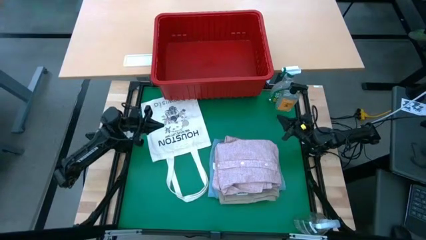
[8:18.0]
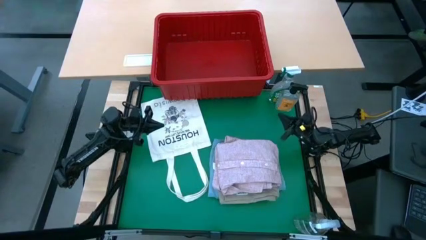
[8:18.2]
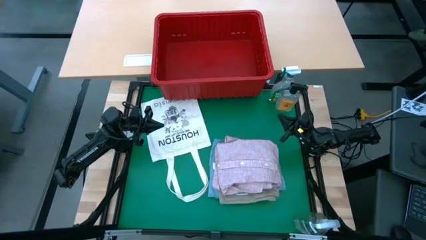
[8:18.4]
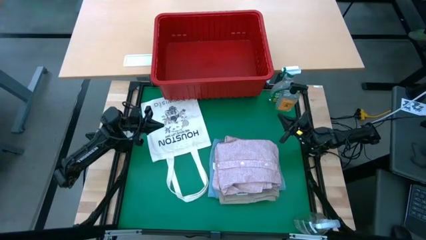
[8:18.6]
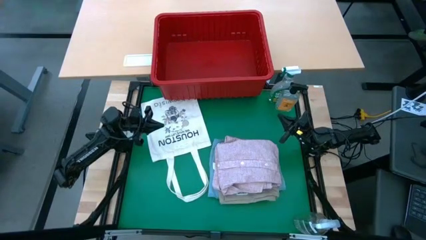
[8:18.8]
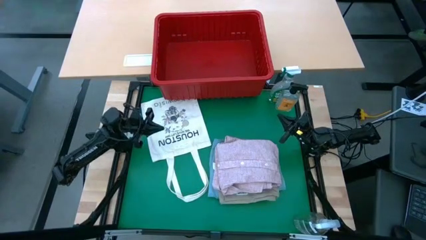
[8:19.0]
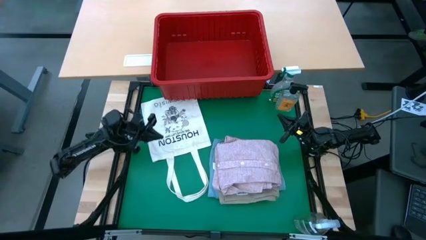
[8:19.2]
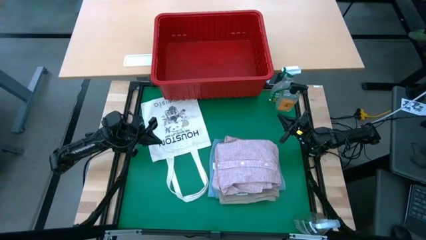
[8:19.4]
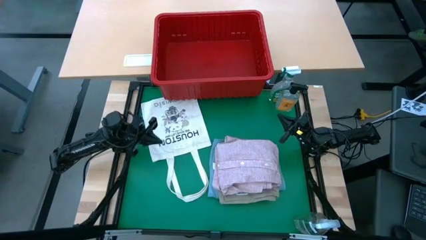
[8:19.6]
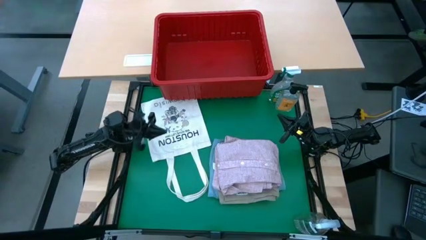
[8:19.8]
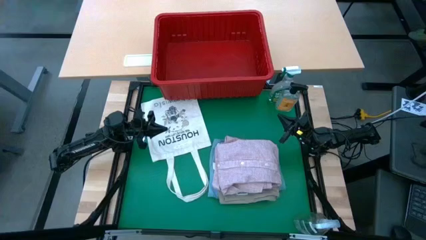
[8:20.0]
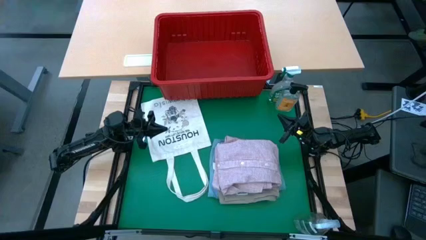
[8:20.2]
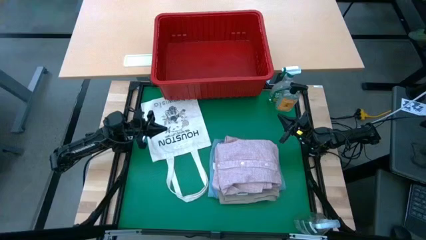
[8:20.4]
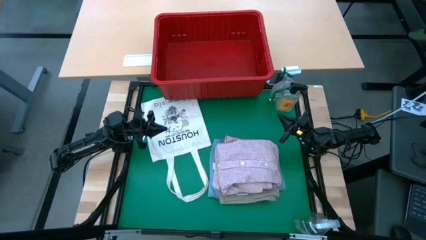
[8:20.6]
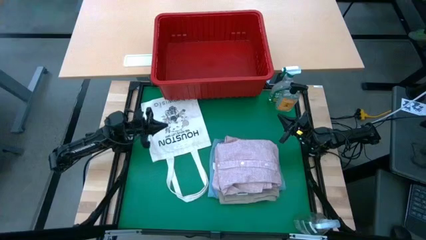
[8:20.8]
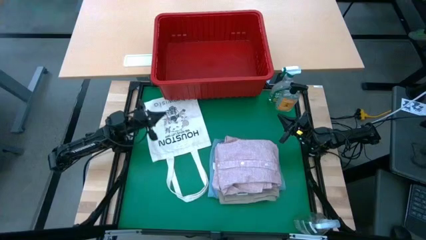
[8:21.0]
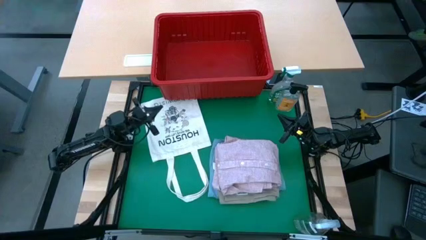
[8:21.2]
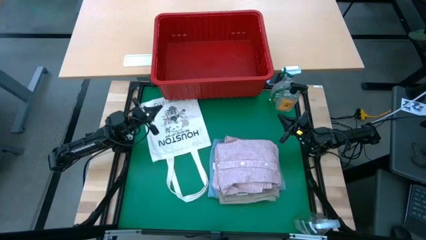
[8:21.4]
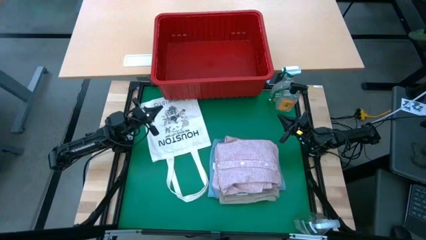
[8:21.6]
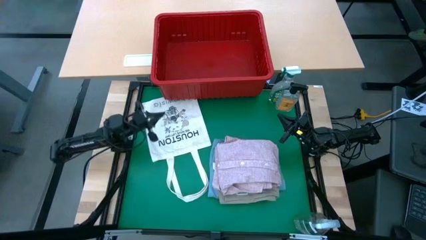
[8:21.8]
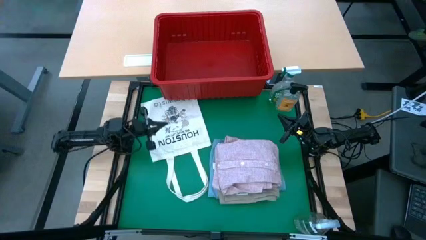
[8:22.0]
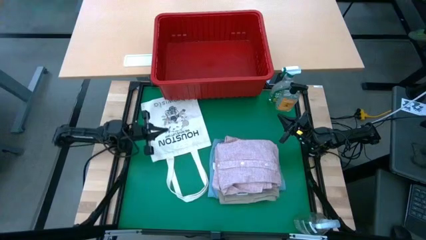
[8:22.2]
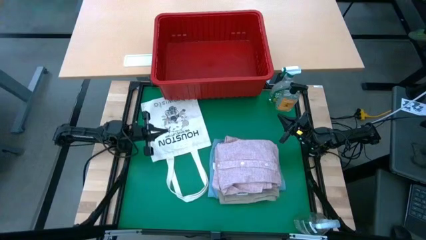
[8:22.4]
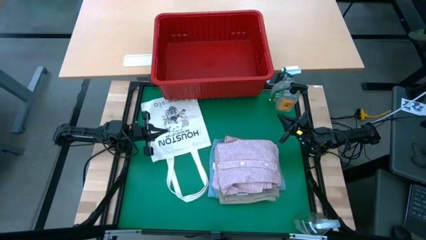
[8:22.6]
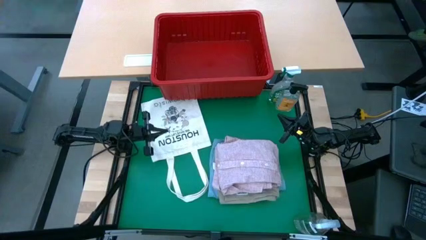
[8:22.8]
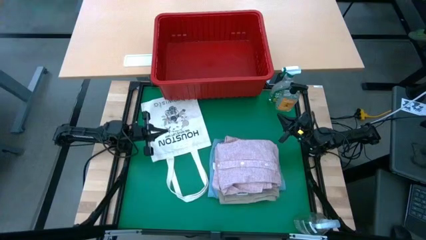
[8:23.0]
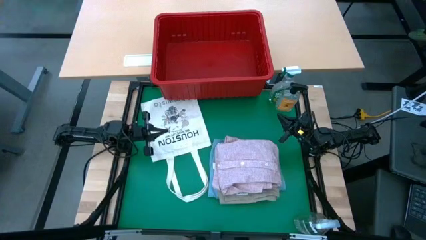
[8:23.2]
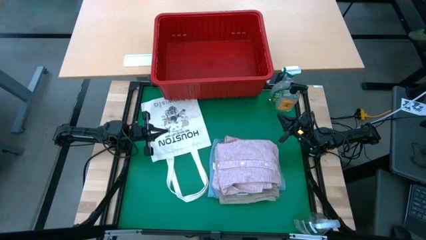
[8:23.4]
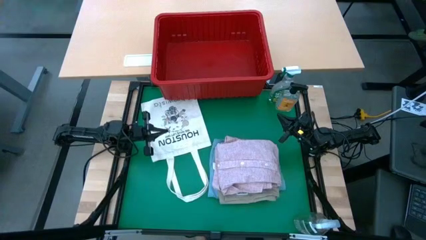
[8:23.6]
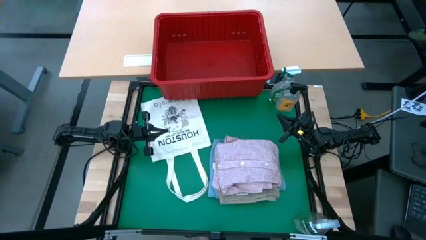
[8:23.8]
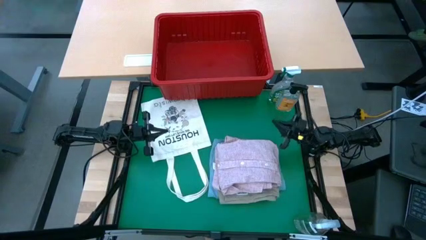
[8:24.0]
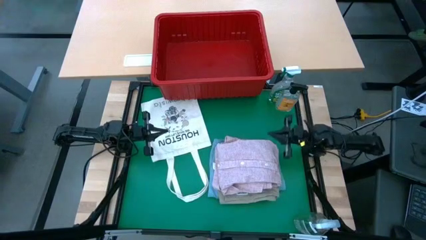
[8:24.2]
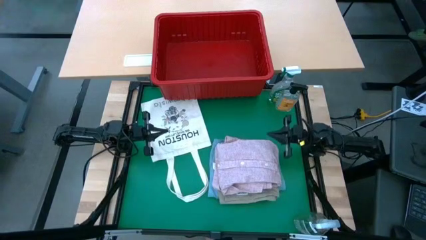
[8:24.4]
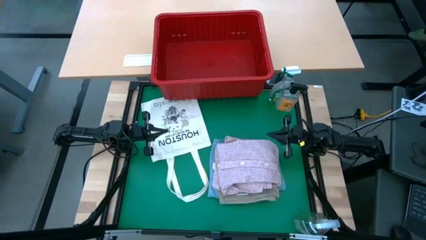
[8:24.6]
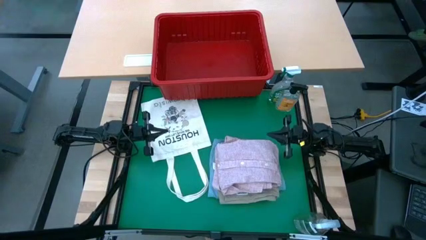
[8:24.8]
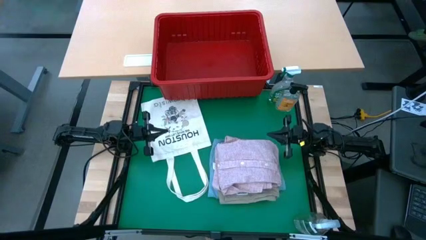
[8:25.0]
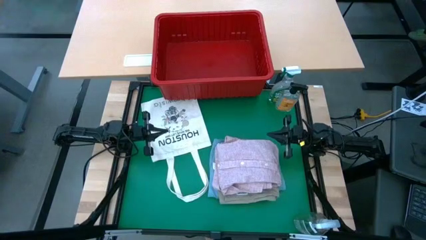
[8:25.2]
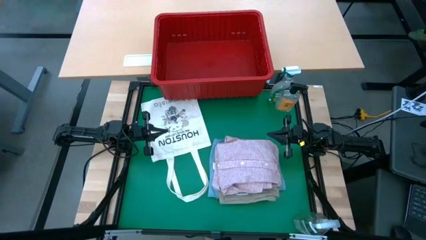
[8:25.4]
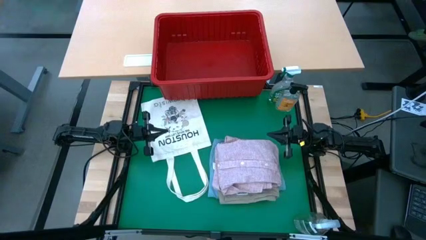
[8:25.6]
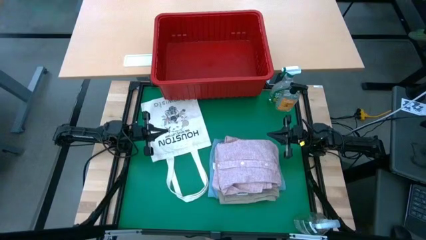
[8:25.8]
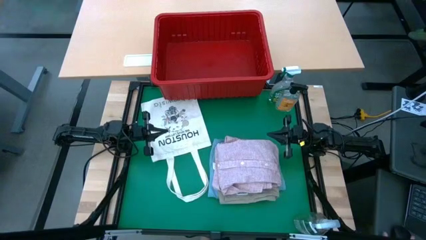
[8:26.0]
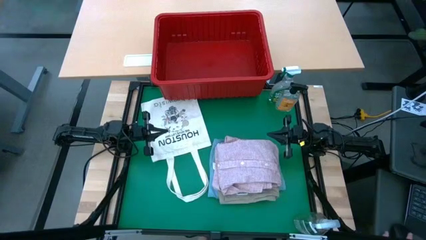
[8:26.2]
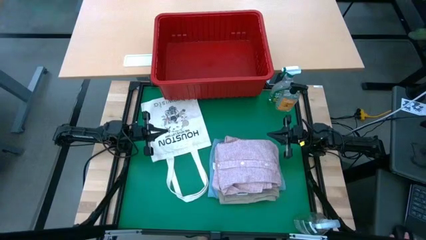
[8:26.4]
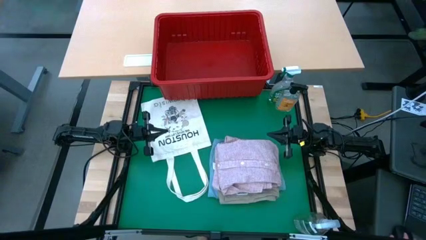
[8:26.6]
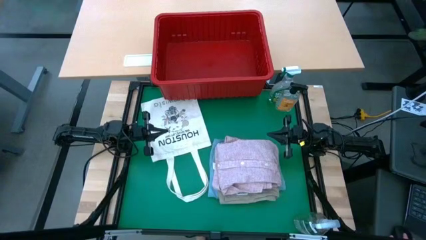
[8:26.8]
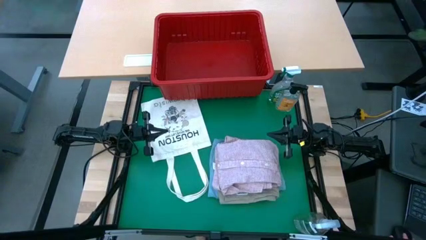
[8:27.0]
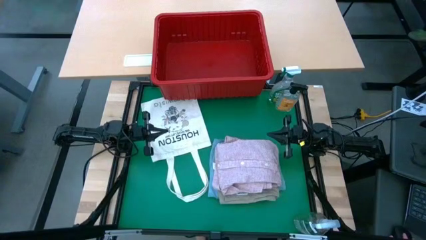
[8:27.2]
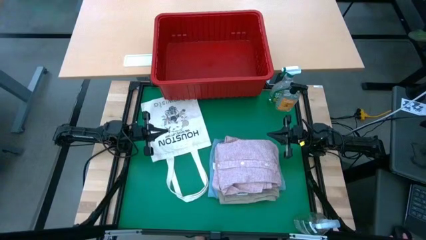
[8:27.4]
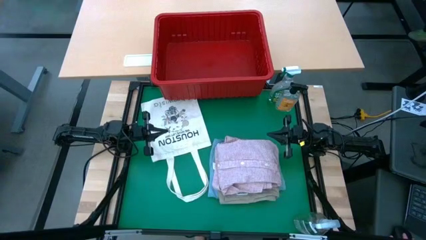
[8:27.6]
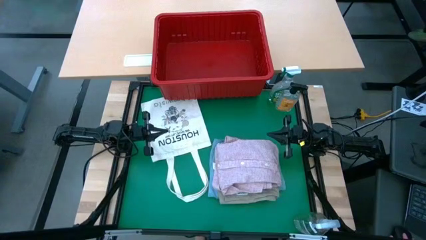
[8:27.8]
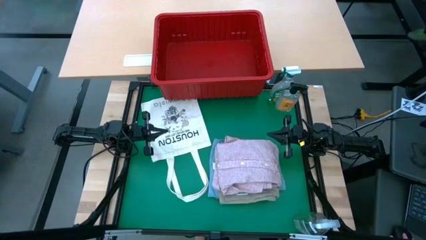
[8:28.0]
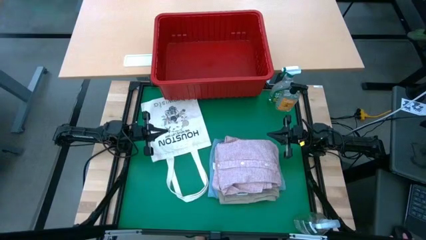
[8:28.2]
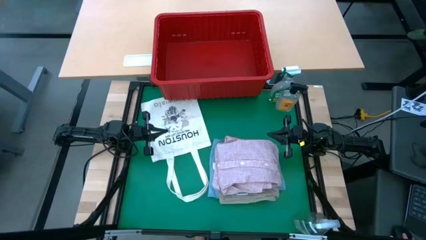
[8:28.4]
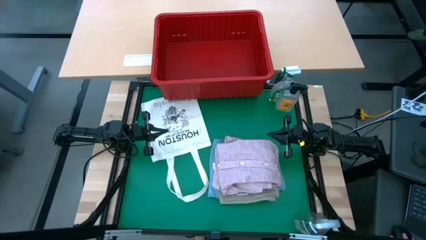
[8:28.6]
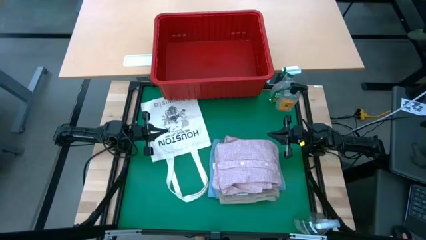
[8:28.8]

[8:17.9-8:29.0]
Task: Fold laundry
Return to Home Position
